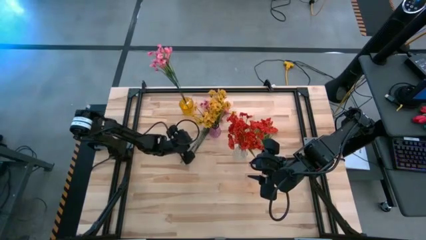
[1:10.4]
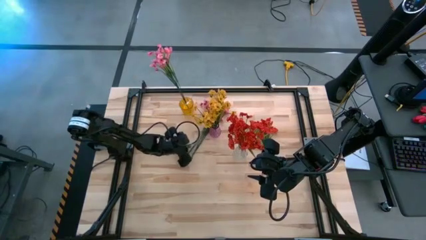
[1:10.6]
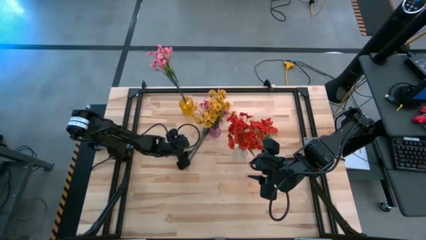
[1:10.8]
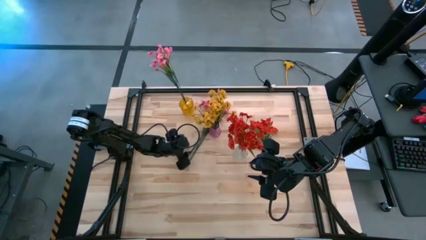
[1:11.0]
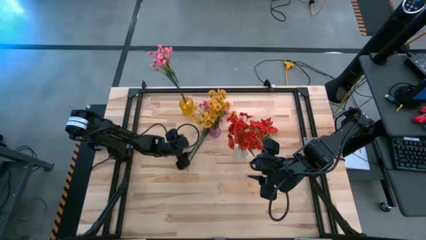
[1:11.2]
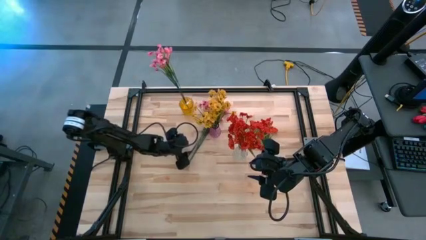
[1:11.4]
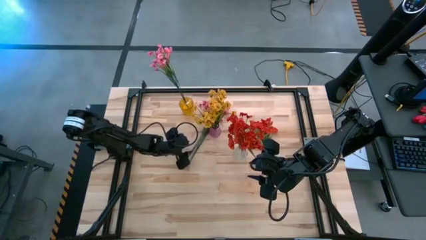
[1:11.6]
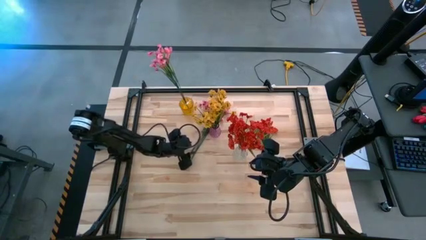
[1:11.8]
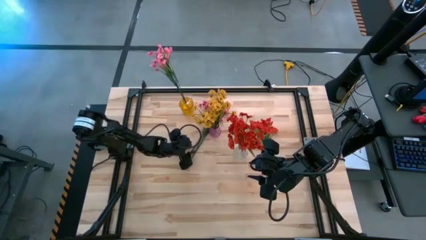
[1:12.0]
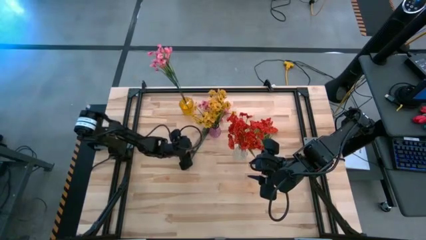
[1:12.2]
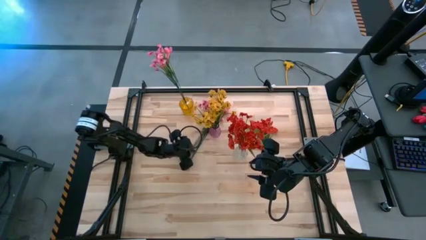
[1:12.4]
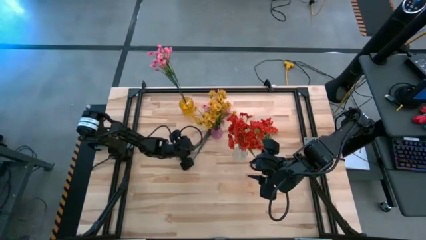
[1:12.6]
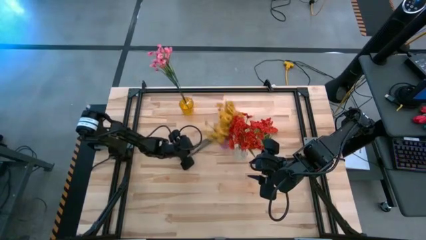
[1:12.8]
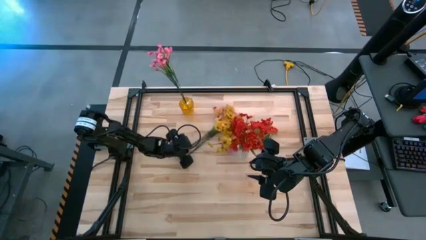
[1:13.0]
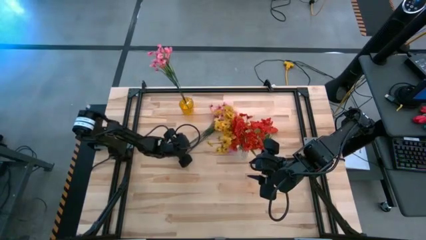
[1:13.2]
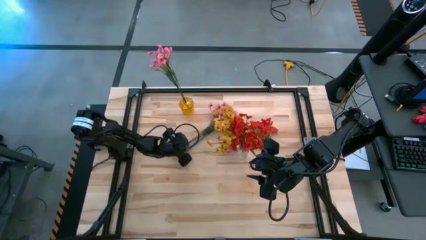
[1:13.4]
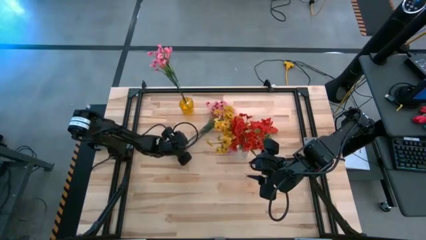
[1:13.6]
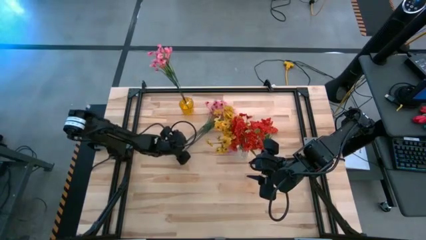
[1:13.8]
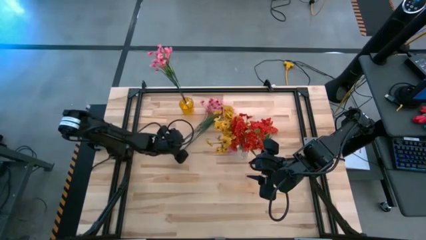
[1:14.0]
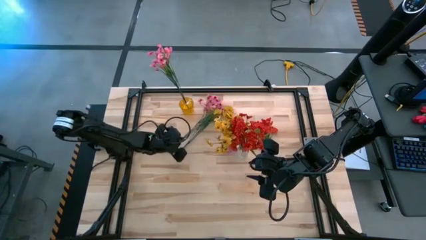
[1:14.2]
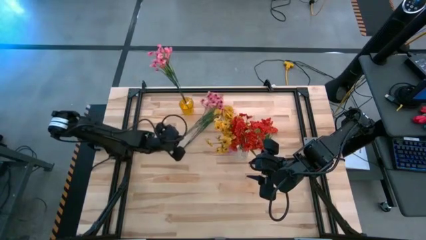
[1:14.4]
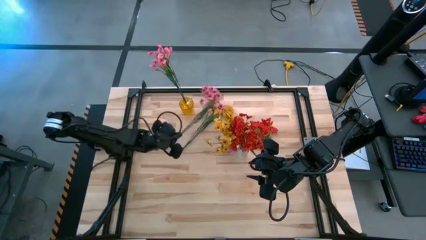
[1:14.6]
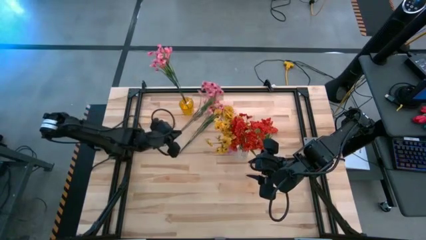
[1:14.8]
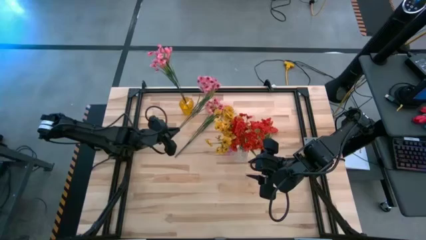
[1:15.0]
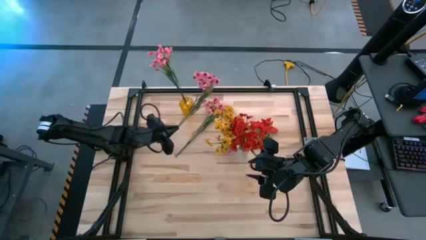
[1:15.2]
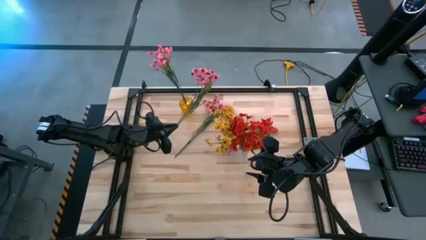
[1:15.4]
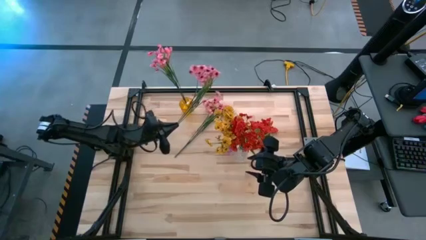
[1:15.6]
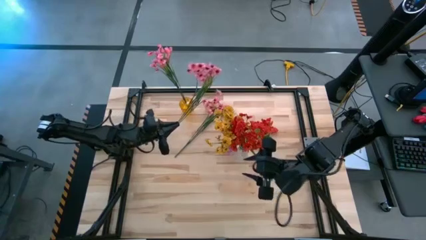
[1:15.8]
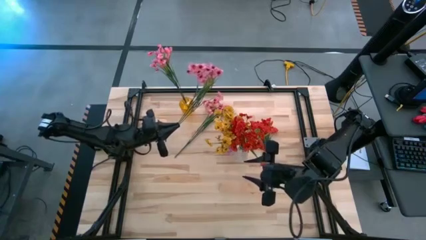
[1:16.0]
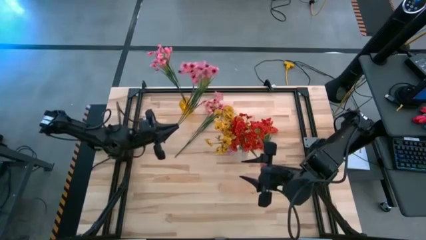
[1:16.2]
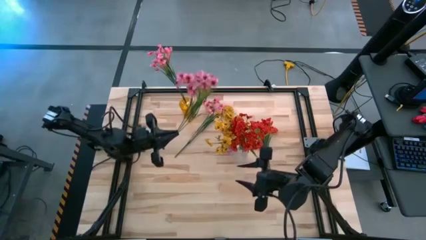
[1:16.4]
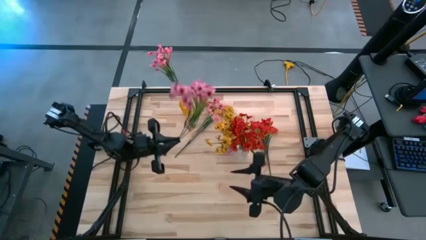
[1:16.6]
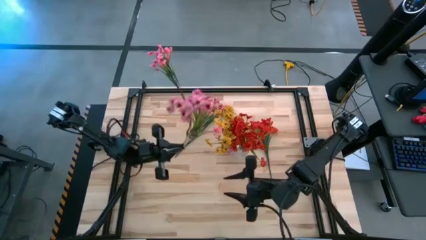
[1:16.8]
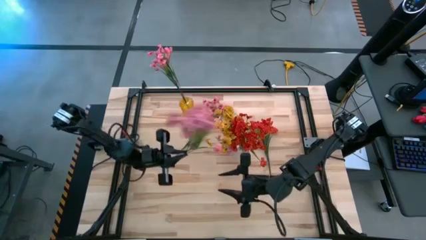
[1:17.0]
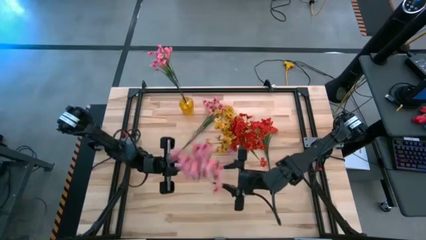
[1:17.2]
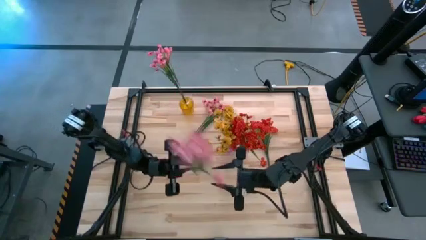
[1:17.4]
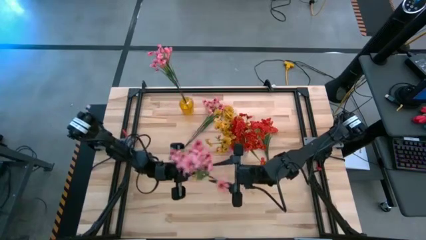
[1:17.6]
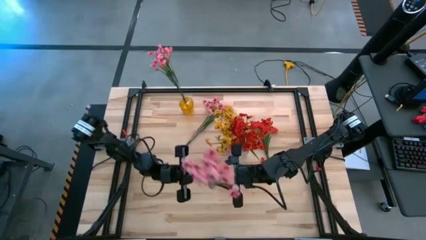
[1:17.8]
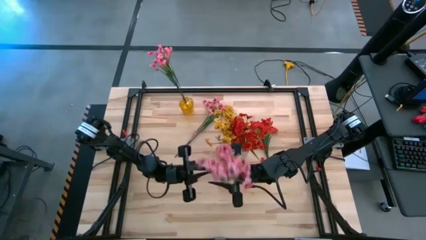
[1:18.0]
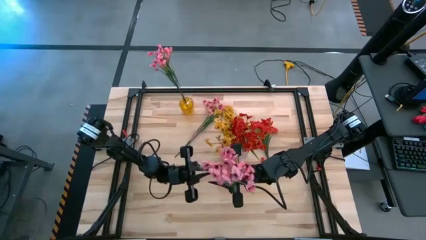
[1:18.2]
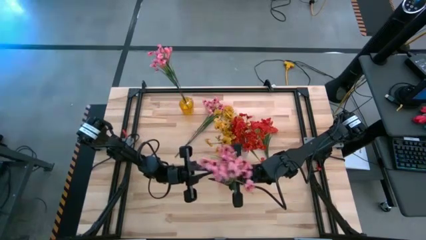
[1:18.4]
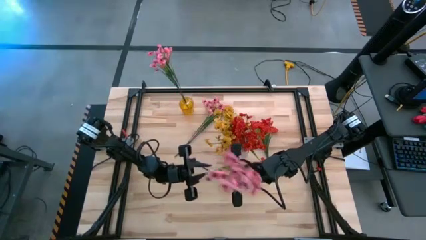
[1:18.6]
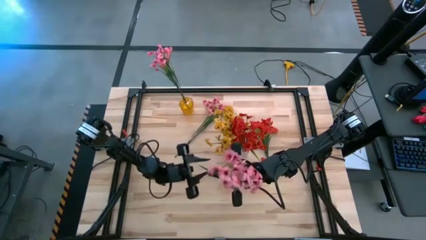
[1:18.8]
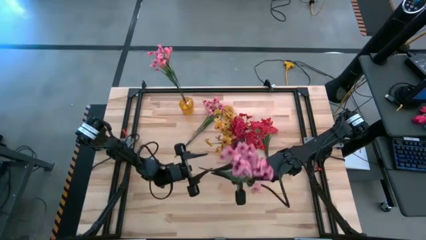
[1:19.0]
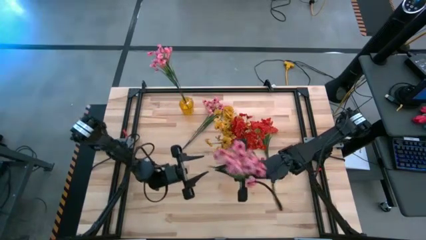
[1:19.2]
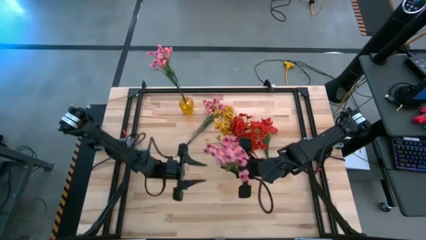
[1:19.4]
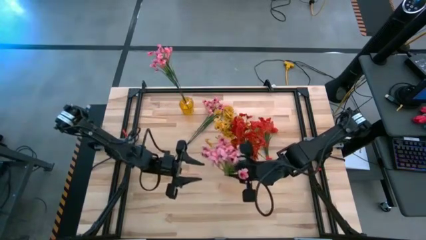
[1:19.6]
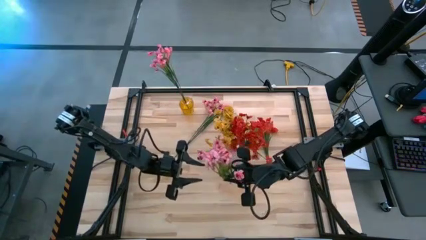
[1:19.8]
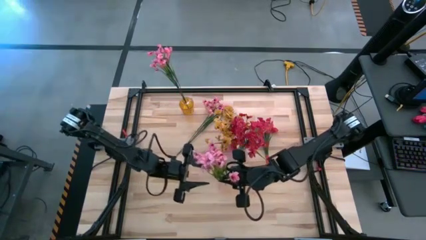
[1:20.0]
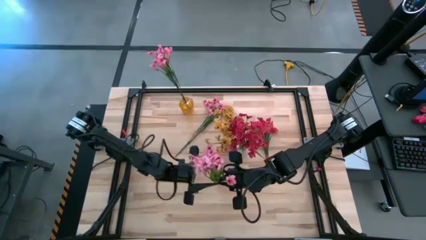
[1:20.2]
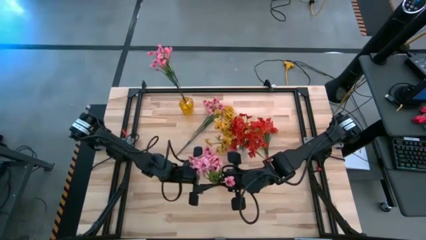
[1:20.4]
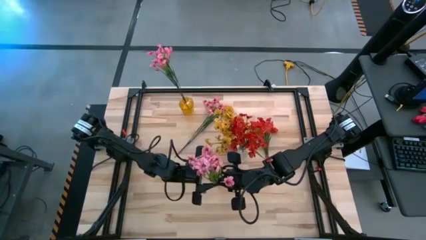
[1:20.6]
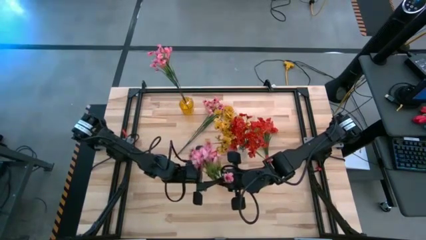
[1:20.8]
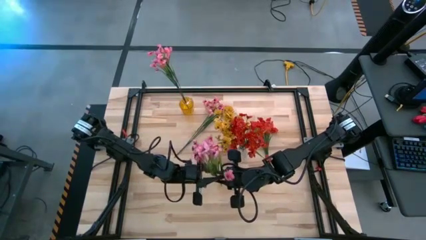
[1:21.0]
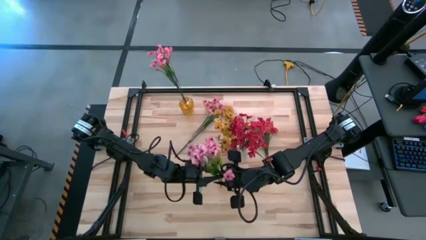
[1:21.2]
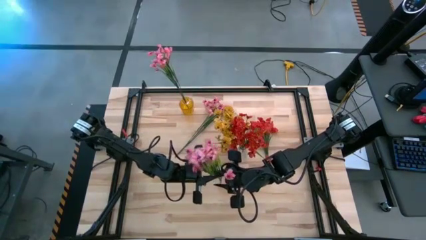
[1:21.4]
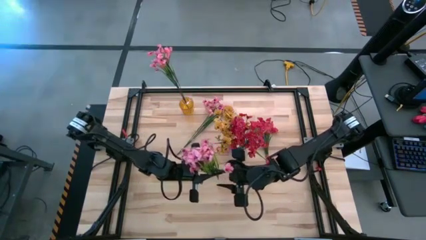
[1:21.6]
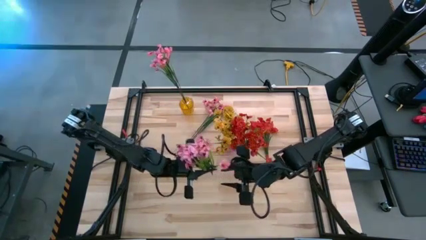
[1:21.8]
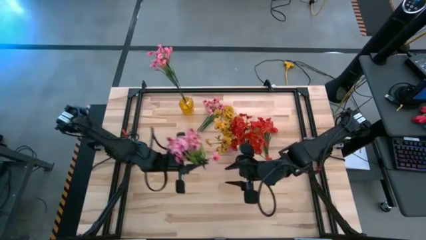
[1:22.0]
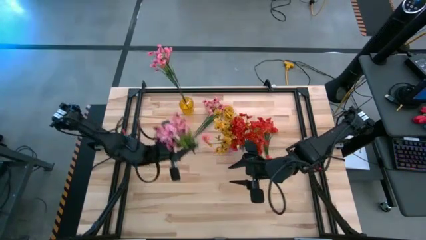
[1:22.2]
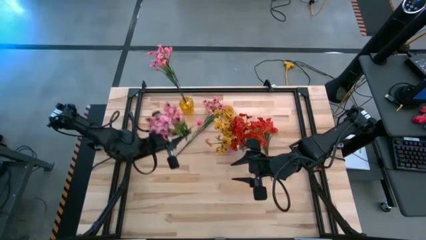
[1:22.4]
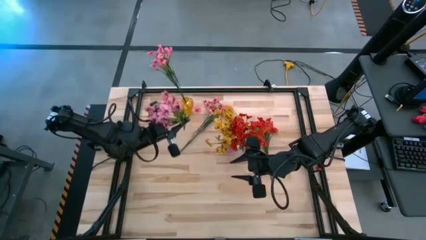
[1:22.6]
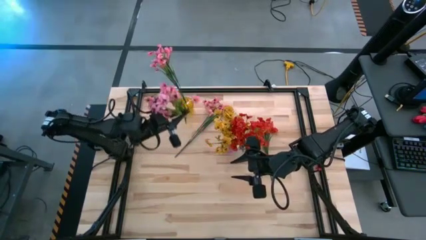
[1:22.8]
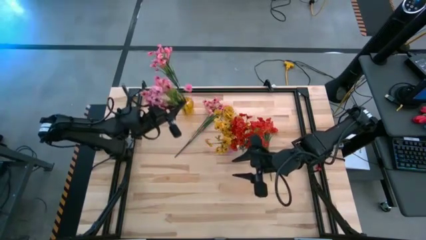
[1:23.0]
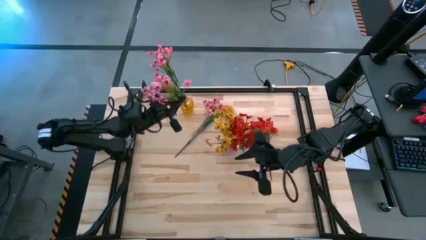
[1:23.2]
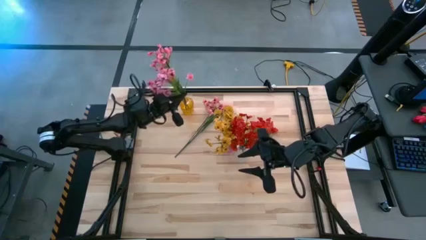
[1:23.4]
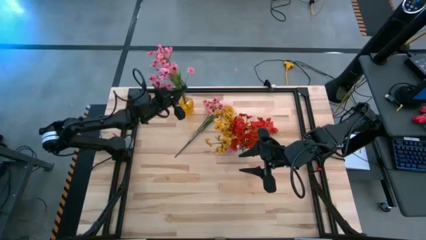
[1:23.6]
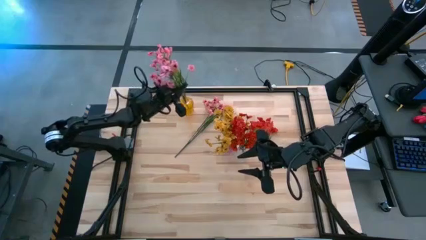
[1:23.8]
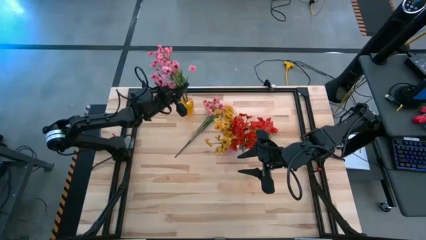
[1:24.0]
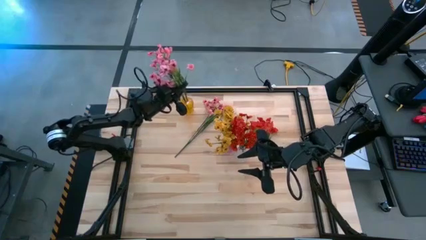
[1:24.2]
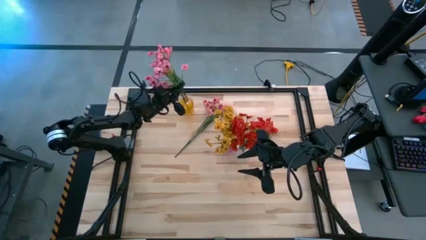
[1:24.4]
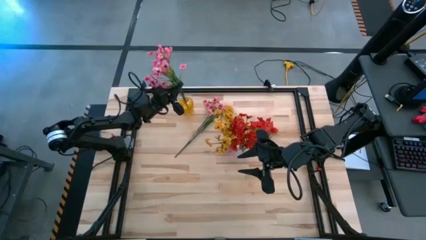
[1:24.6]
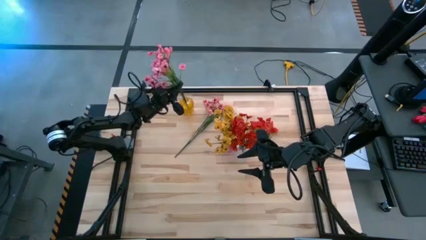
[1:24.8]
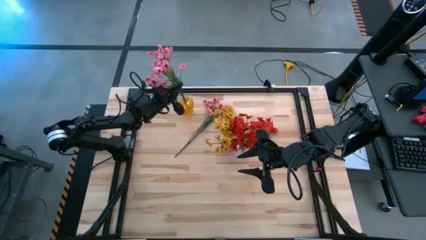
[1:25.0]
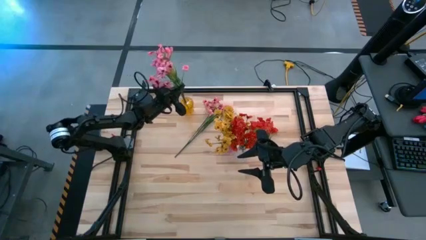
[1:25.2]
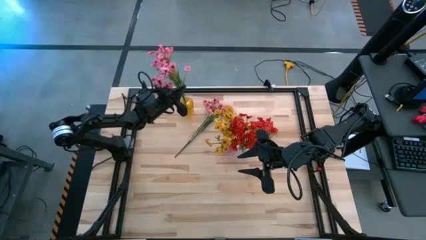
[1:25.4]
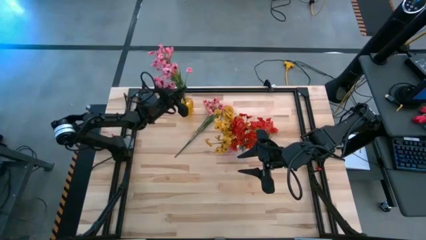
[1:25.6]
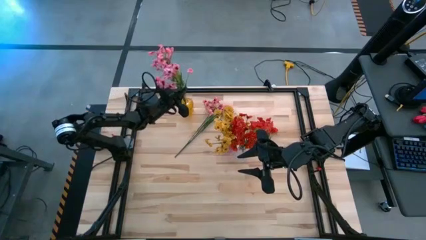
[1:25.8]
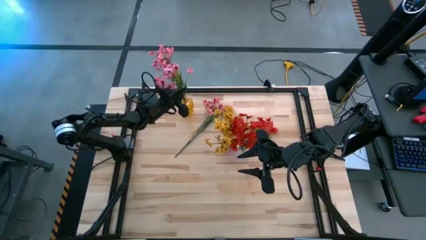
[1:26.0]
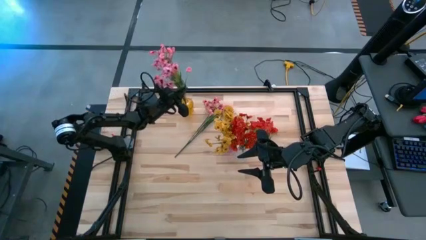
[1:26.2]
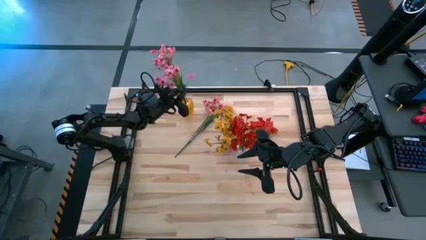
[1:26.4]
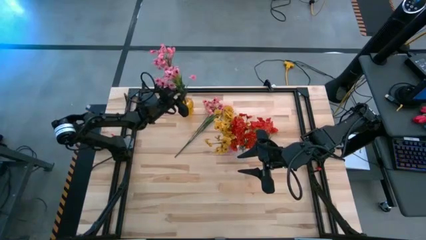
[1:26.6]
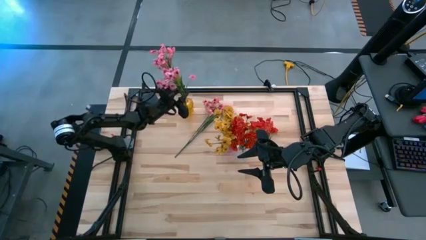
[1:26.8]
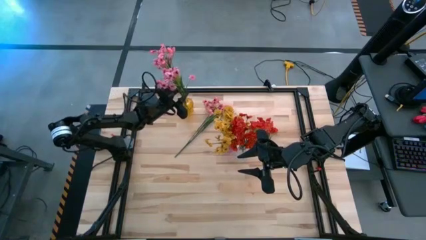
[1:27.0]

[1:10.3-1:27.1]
Task: Sort flowers into vase by color
Put the left pink flowers into the yellow vase

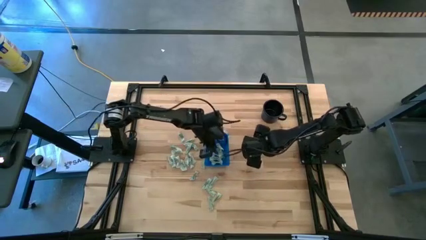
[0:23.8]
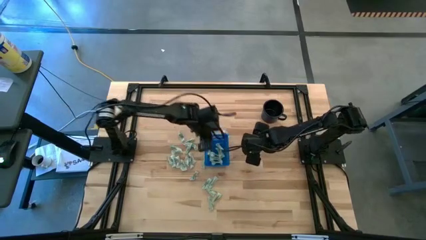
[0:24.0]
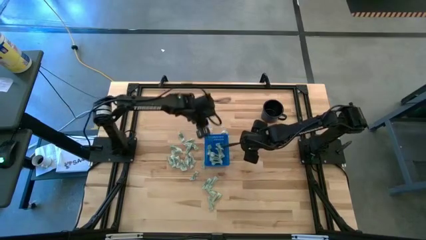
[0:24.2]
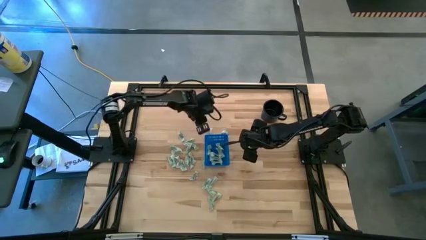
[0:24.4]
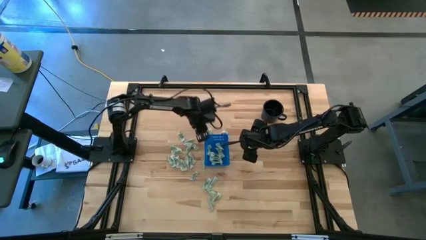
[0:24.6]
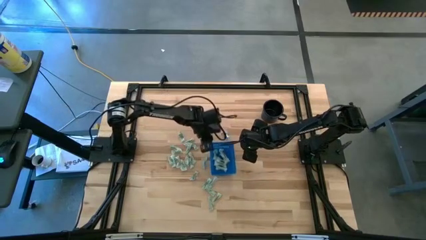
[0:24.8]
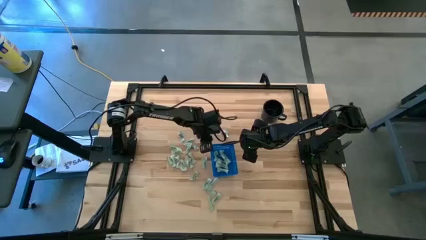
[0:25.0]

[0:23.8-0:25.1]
Task: Pick and place Stevia / Truvia into bins
Adjust the basket on the table
